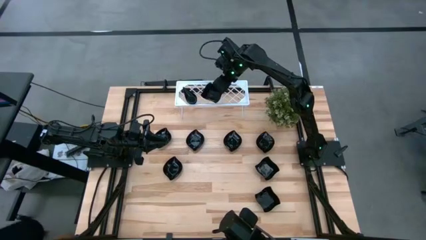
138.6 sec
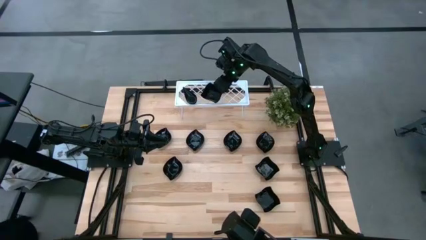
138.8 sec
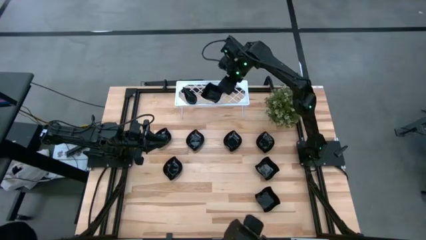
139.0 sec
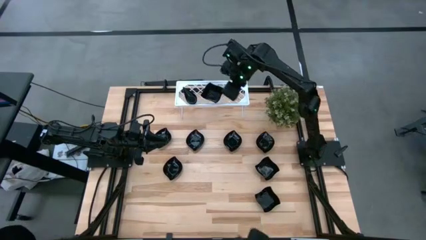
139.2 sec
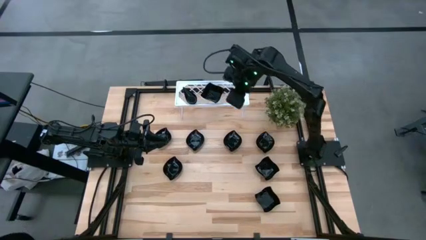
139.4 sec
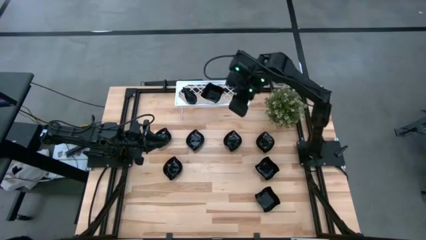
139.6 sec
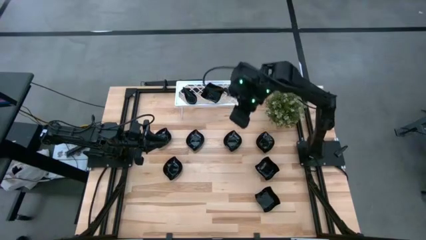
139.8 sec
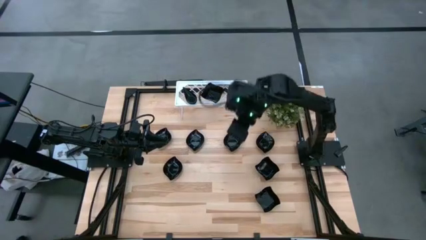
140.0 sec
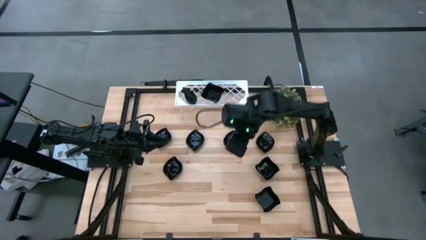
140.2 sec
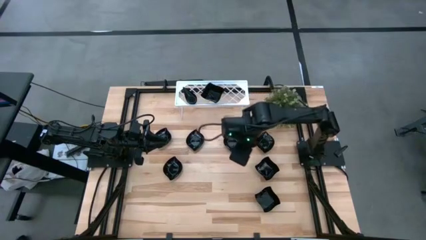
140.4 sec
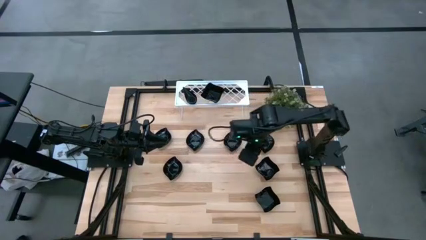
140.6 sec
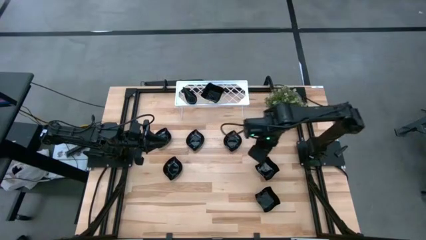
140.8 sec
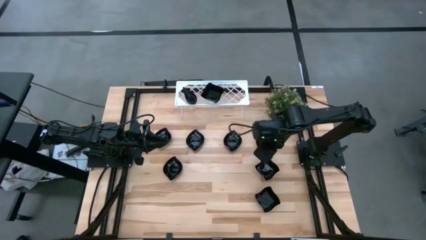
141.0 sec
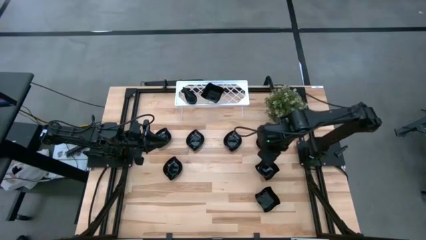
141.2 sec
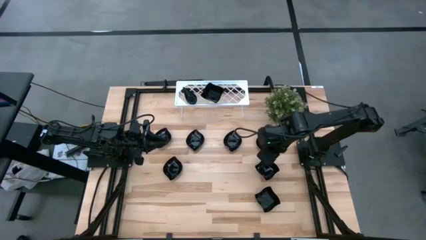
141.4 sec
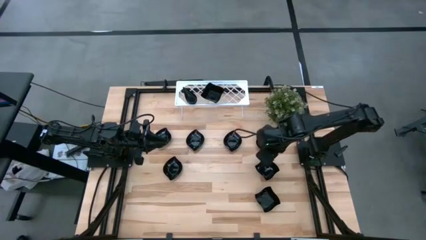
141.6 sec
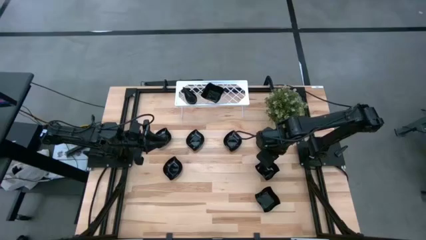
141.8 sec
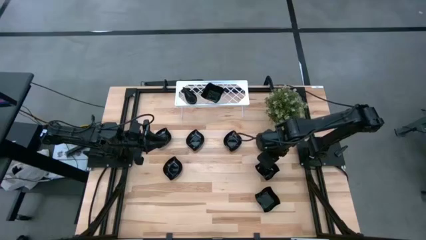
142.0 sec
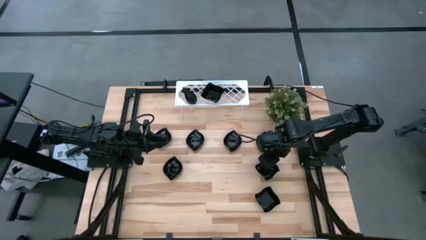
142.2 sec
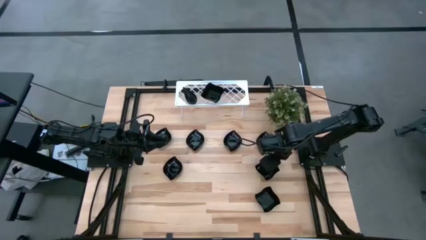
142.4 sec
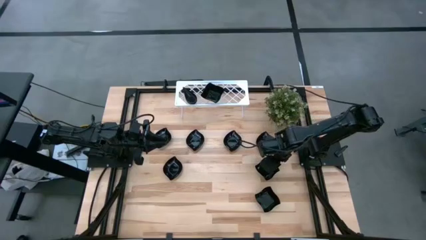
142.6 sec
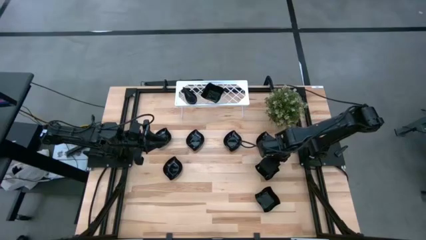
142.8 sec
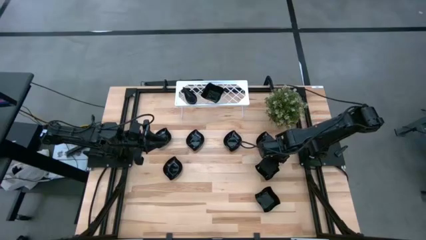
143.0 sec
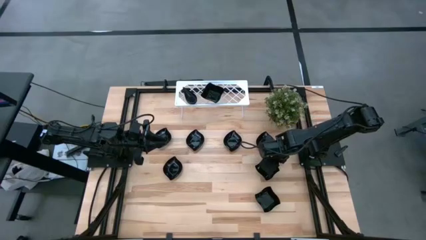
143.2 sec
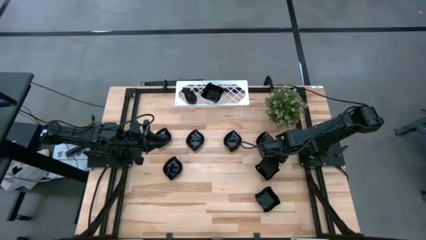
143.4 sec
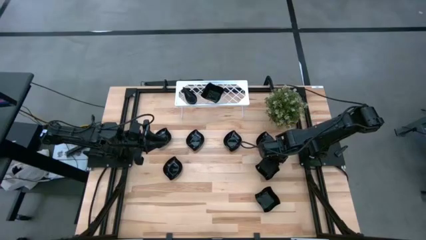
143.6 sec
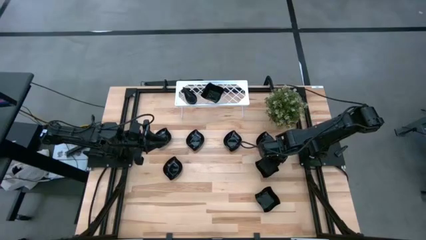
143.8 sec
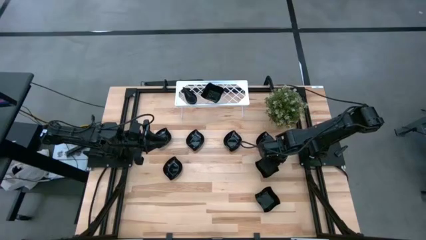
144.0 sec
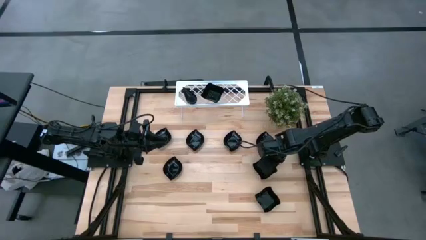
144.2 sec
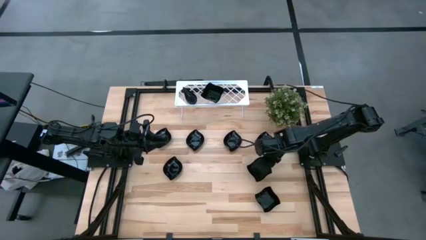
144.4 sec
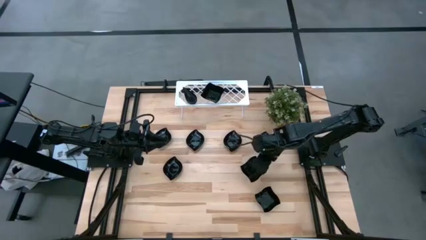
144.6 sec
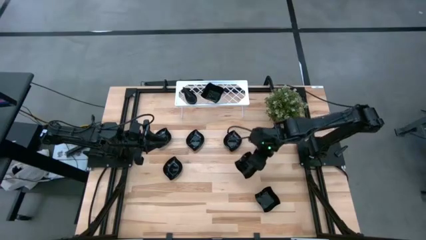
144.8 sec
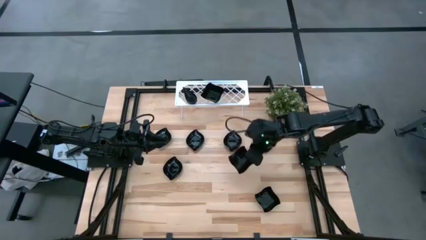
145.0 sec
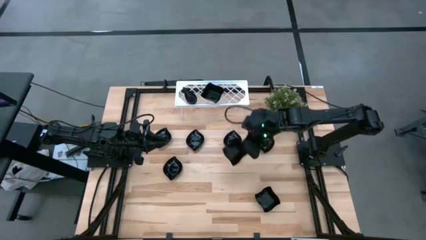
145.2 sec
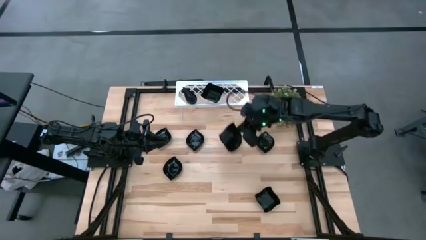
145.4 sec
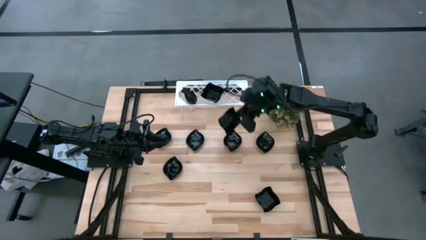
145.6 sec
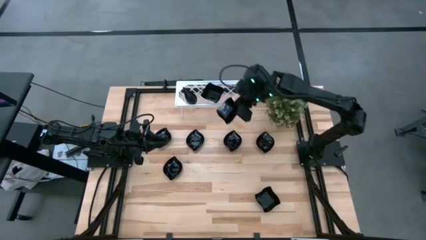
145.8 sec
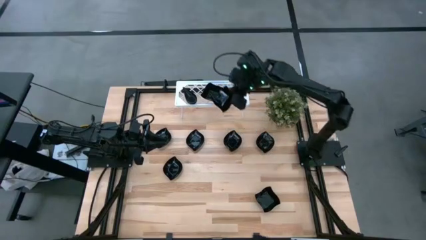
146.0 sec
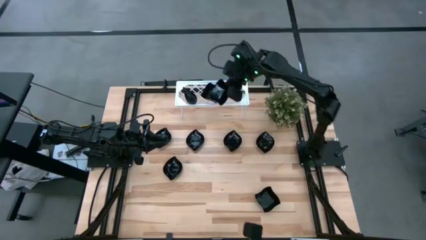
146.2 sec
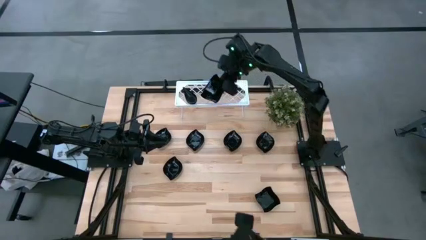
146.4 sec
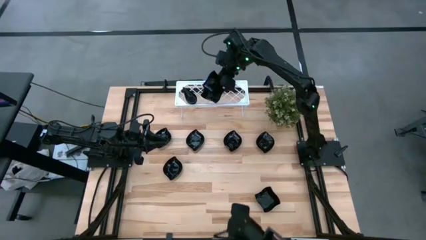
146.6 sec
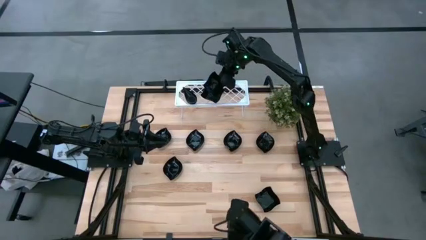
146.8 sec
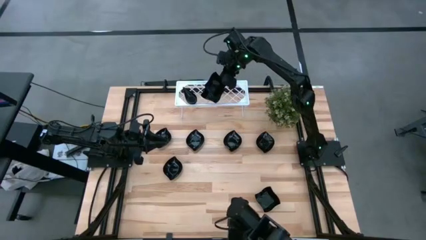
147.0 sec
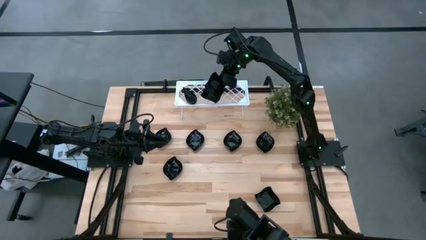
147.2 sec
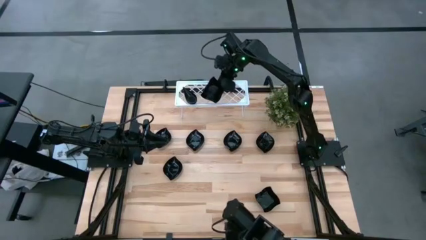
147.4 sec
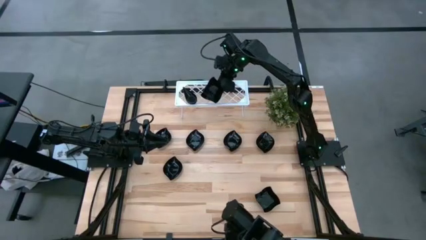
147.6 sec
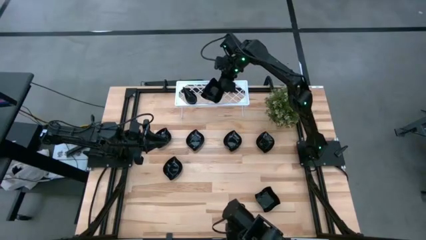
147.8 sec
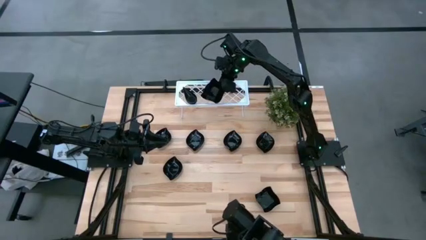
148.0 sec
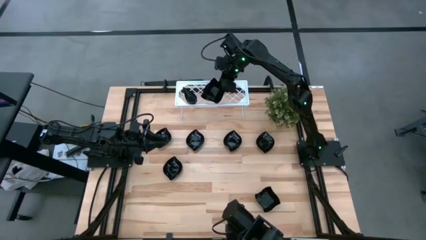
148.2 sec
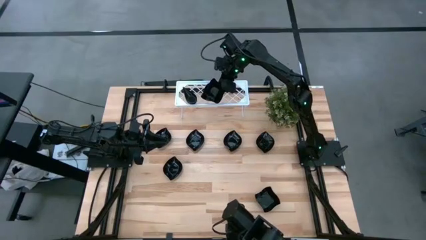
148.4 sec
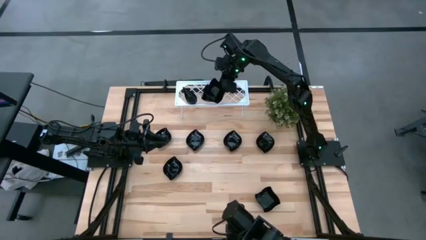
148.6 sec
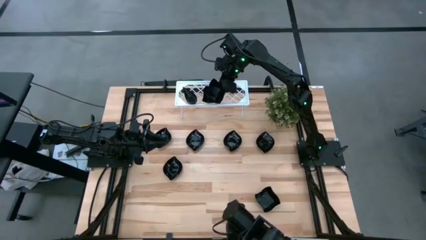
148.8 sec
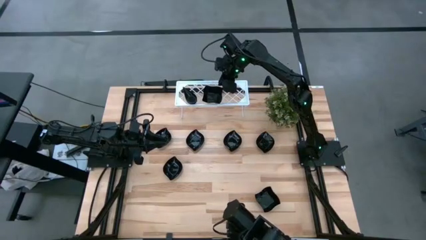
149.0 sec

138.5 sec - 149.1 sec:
Task: Pick & Place Mini shaped plates
Stack the top black distorted square plate on top of the black distorted square plates on the shelf

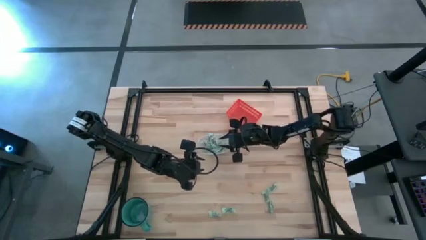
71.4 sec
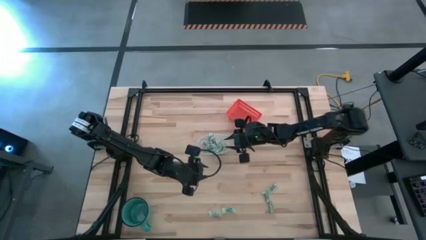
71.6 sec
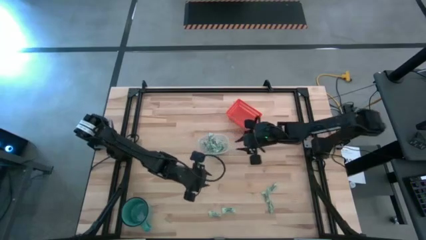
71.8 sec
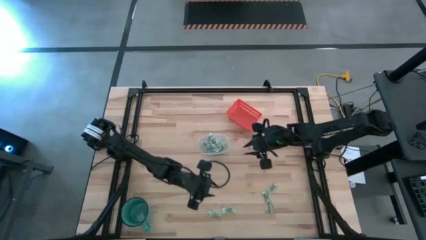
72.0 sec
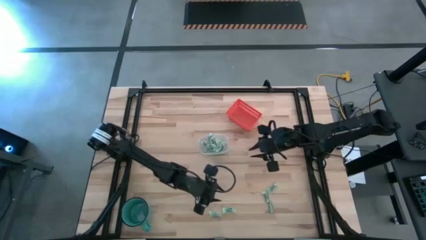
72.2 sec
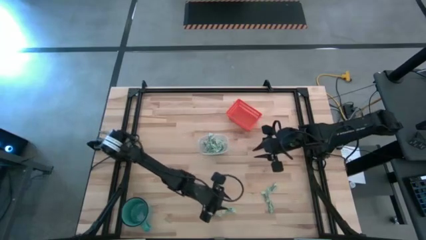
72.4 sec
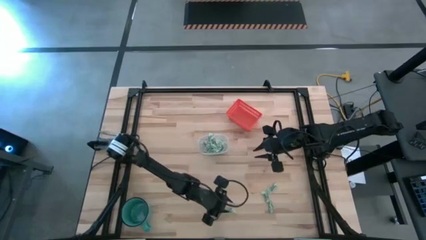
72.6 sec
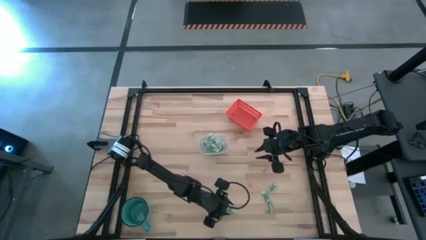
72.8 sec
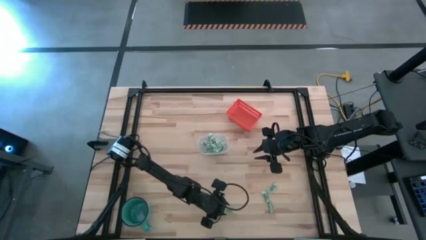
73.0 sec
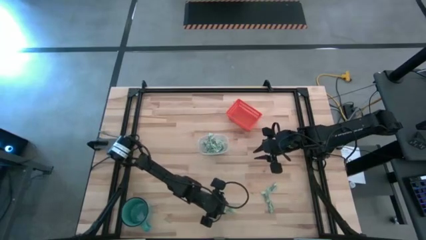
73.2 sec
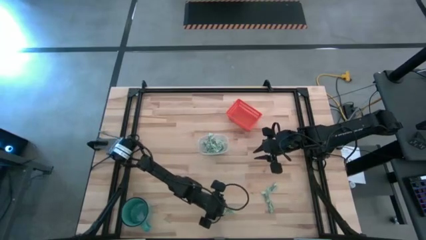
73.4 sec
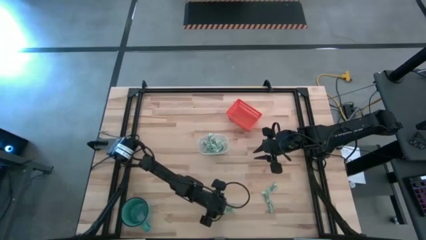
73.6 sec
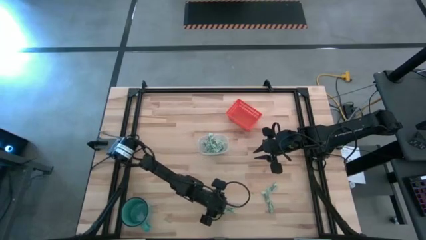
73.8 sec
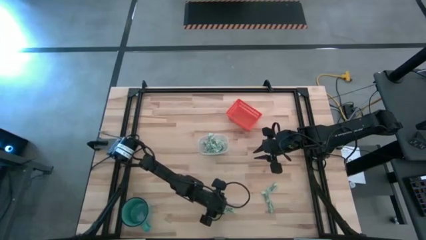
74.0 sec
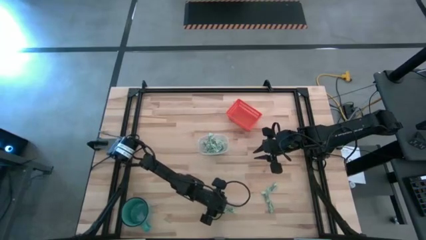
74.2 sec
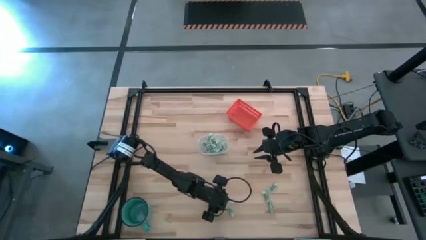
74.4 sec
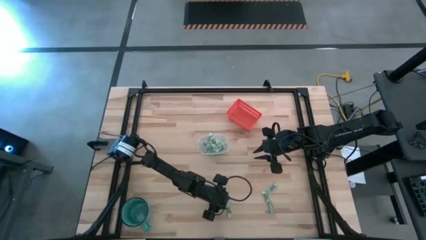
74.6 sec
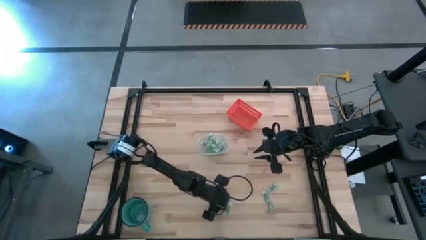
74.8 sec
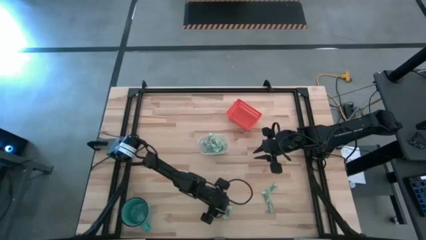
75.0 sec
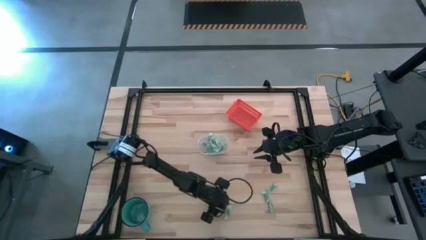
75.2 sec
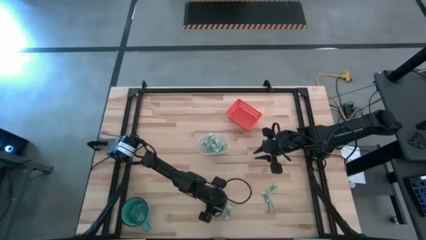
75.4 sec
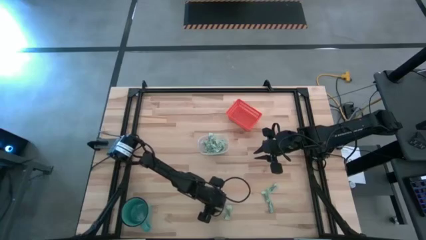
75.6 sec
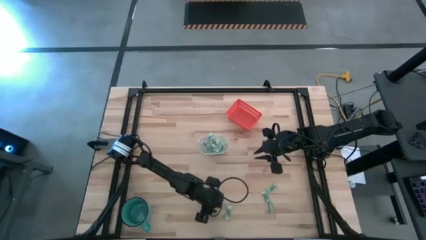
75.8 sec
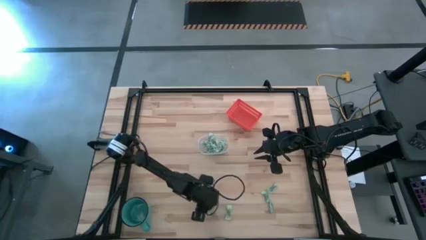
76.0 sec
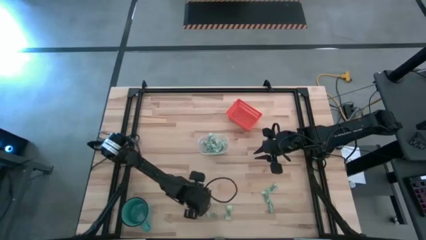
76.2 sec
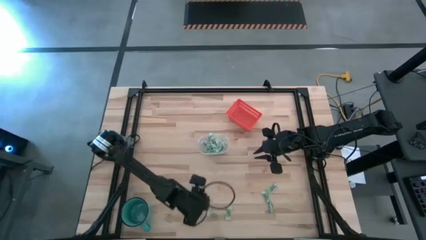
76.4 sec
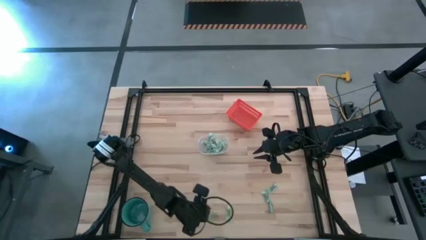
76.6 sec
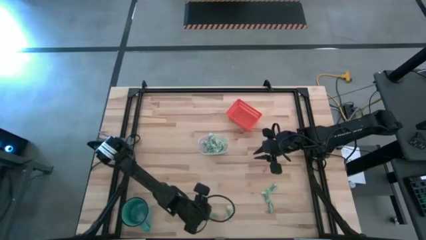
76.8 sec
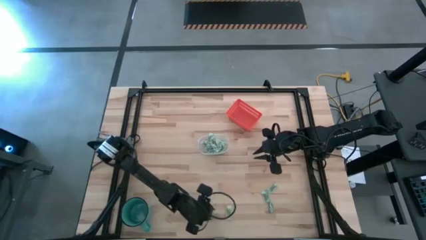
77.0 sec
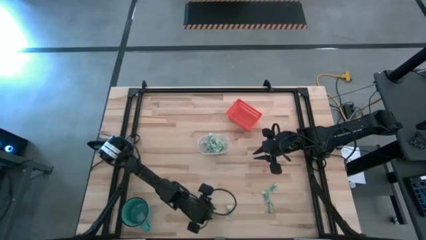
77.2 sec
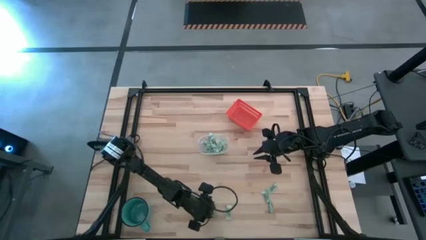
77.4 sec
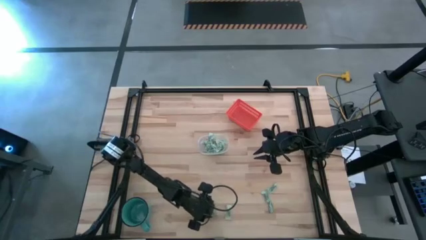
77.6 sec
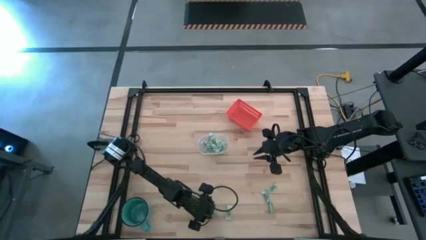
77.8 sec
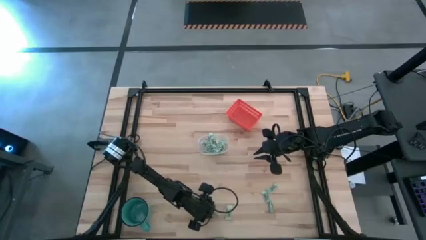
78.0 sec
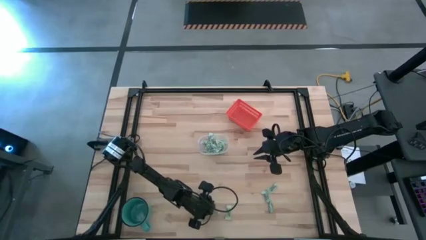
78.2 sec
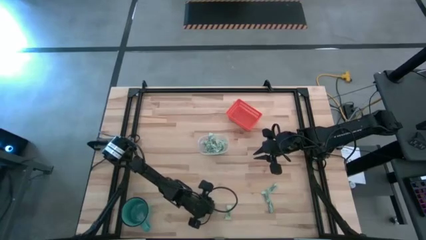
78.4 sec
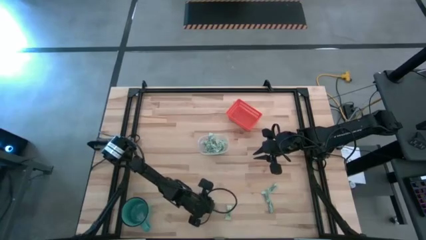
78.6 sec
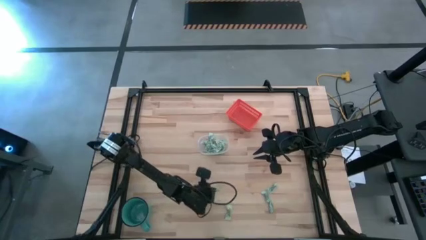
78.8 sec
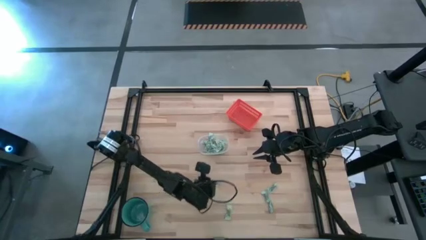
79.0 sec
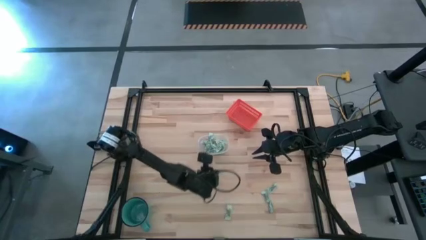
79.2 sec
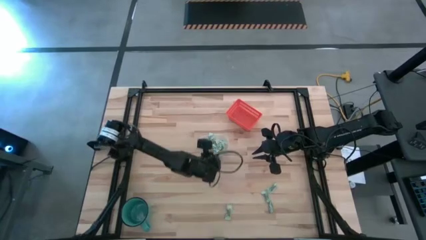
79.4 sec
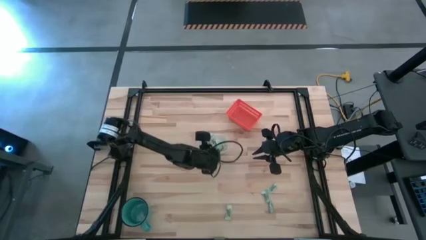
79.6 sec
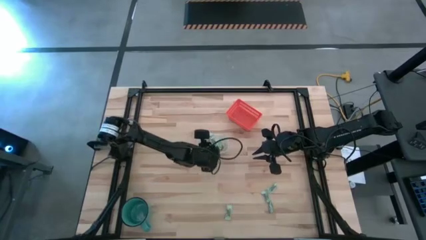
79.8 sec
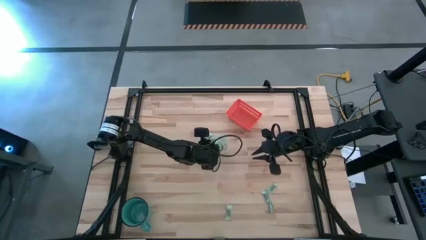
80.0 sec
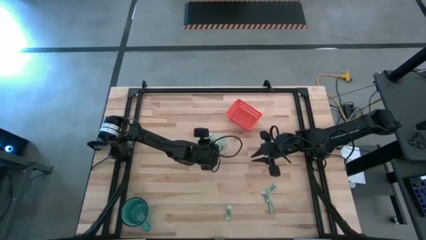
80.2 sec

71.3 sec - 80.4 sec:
Task: Pick and place items into bin
Put the stevia packet into the transparent bin
